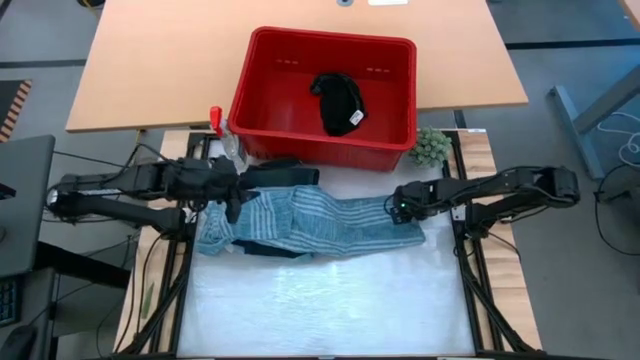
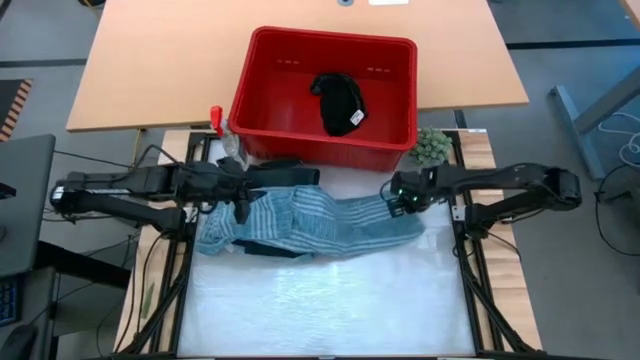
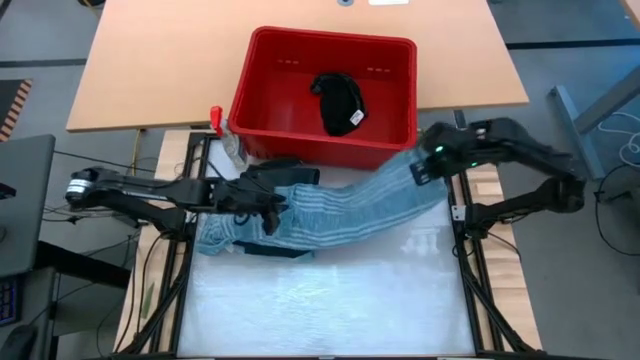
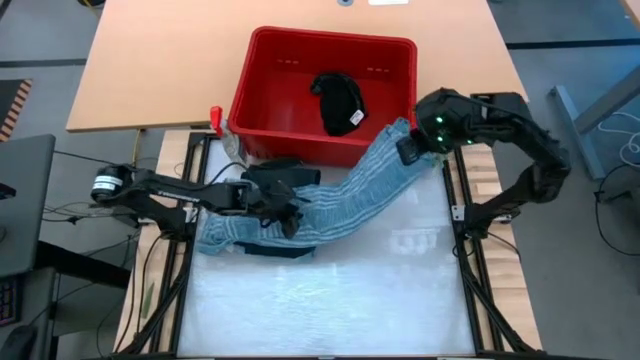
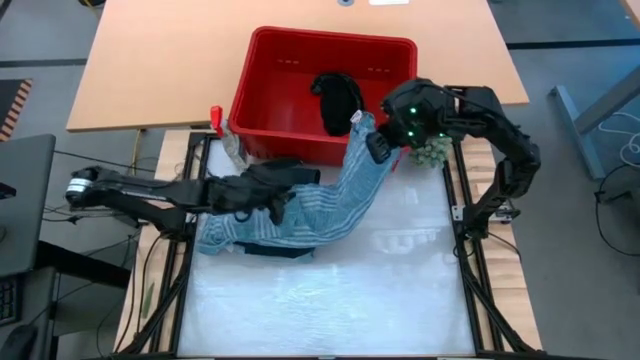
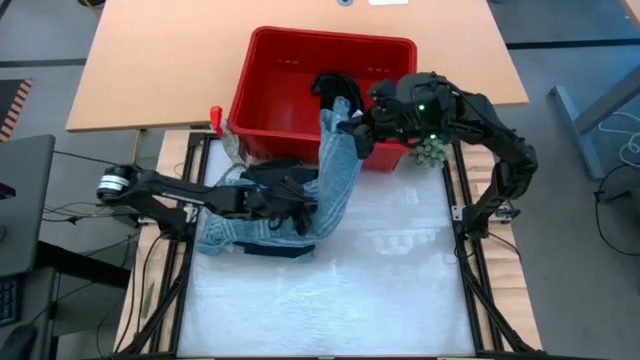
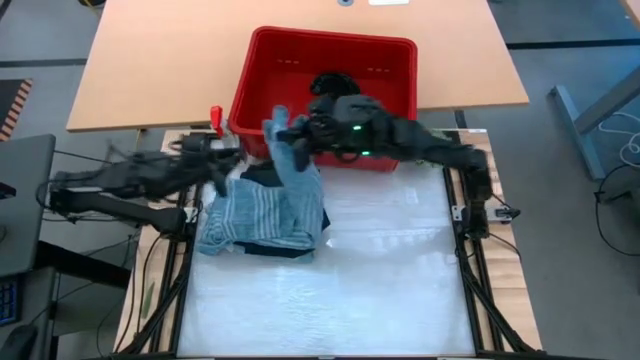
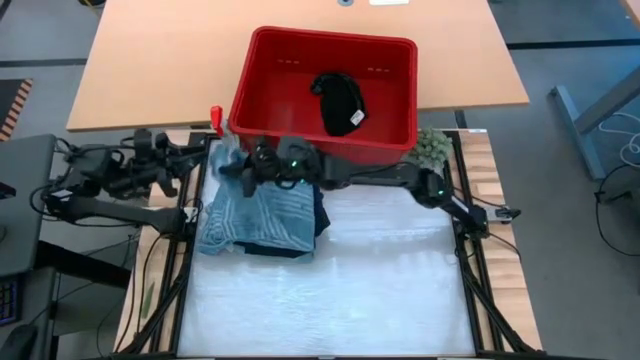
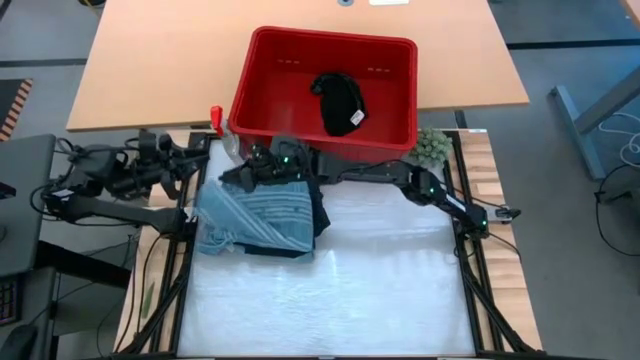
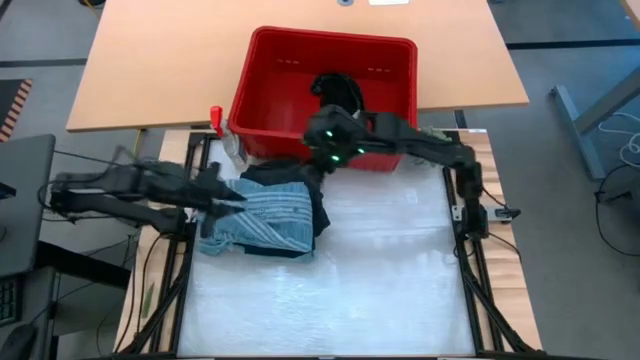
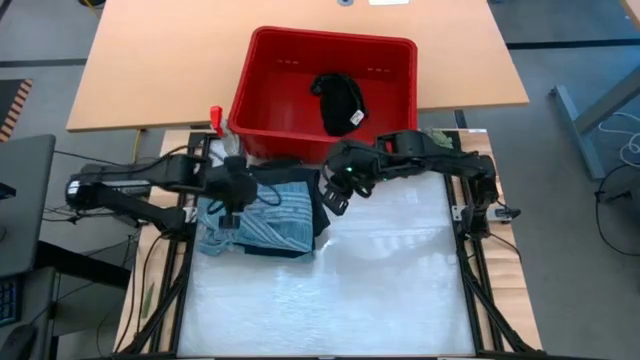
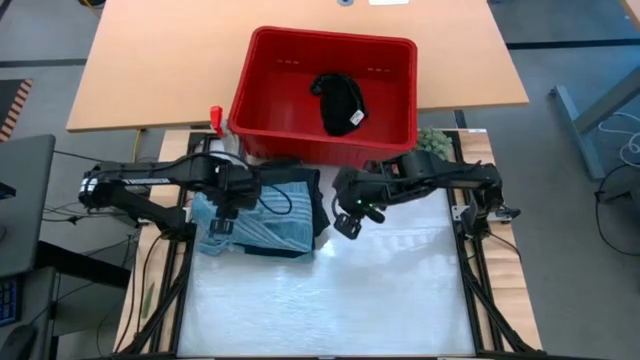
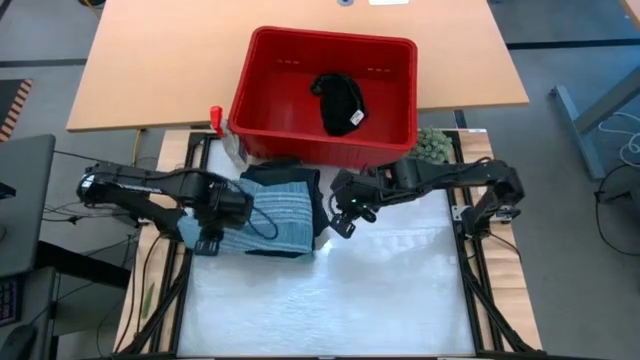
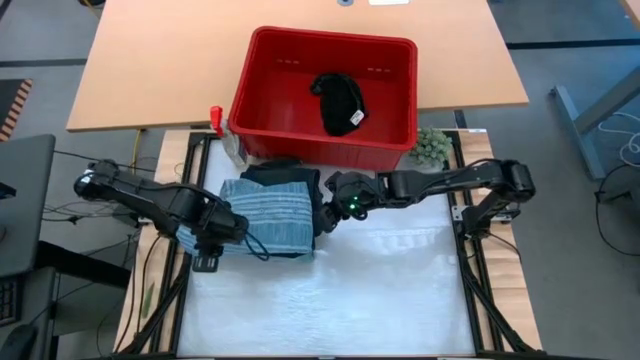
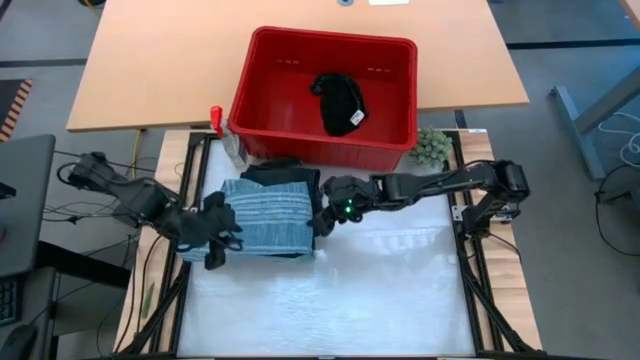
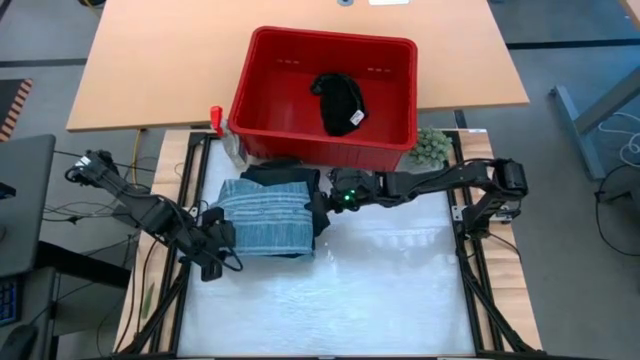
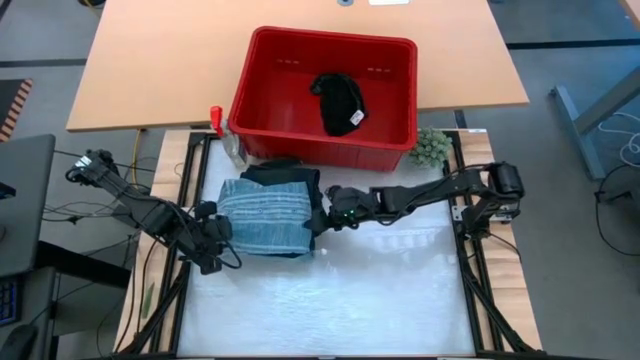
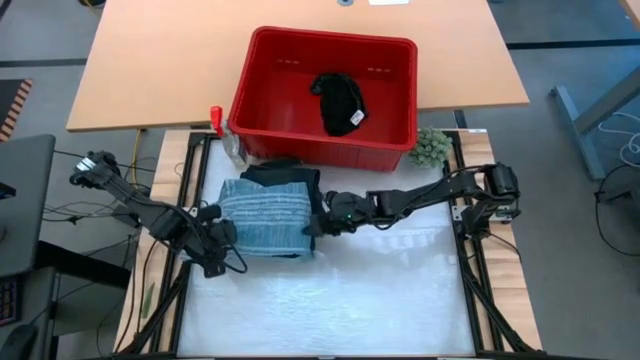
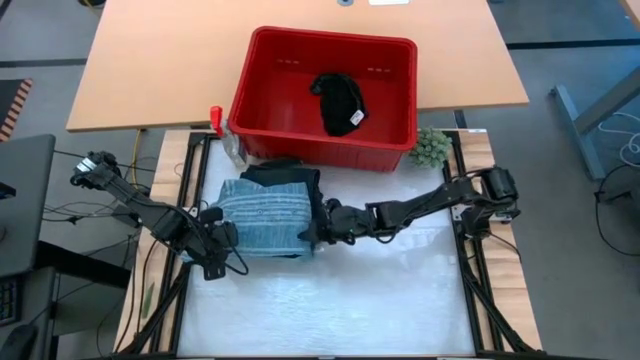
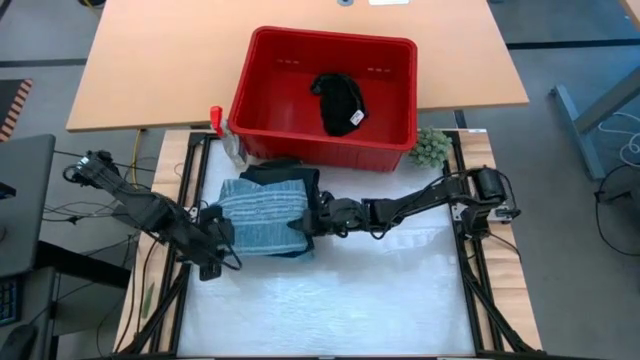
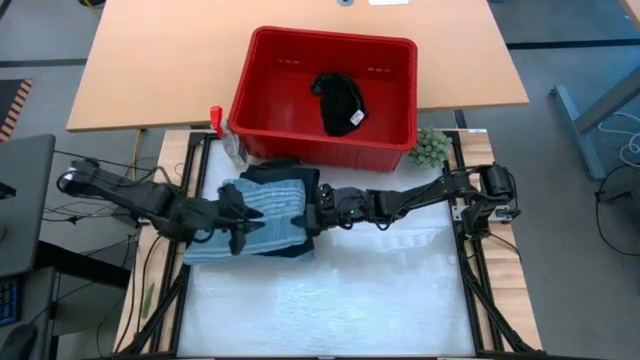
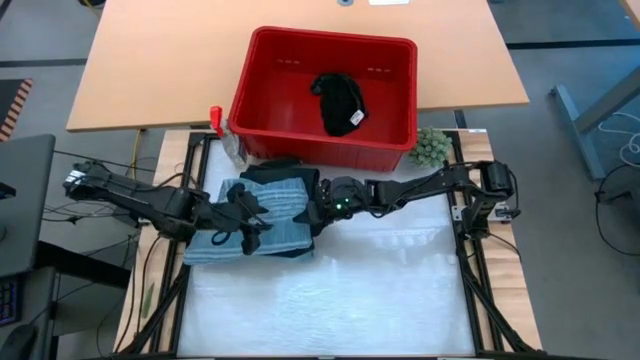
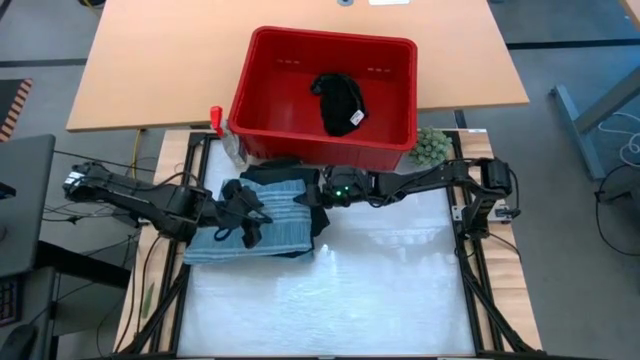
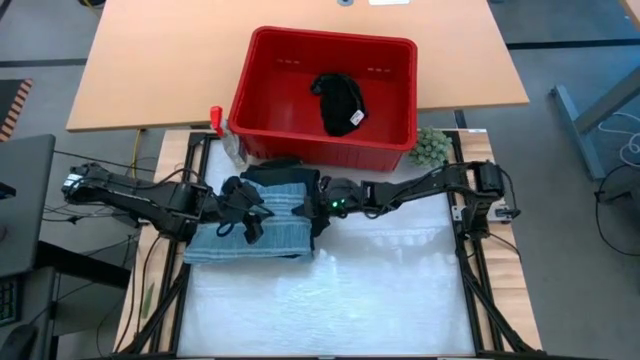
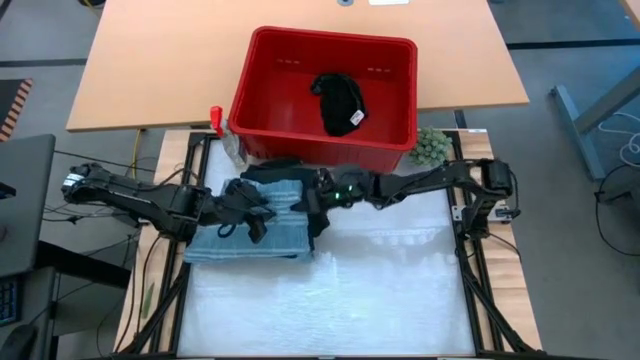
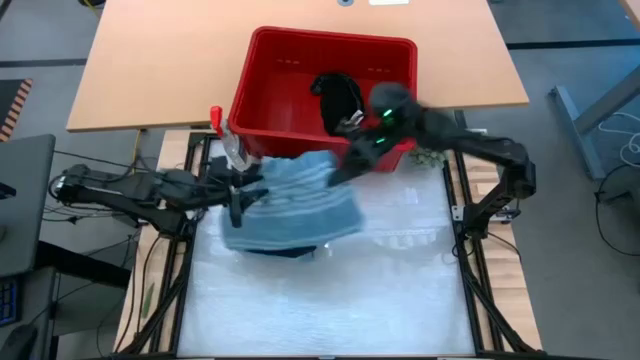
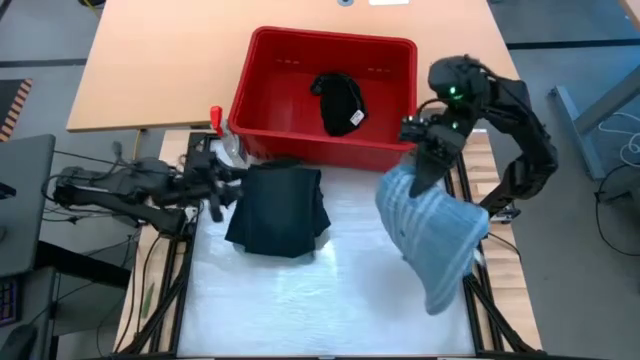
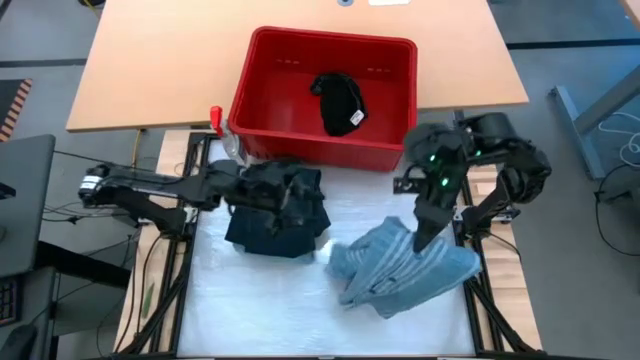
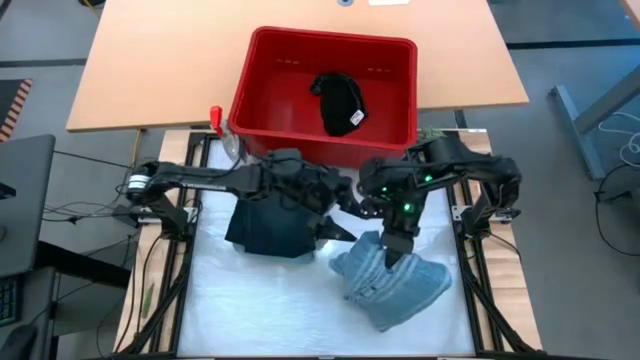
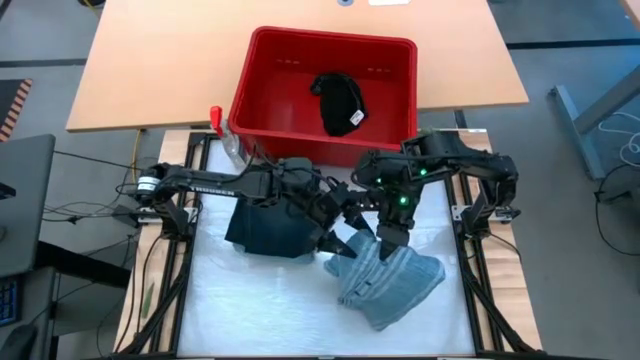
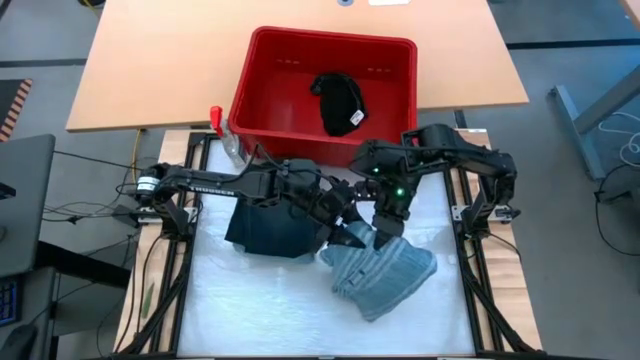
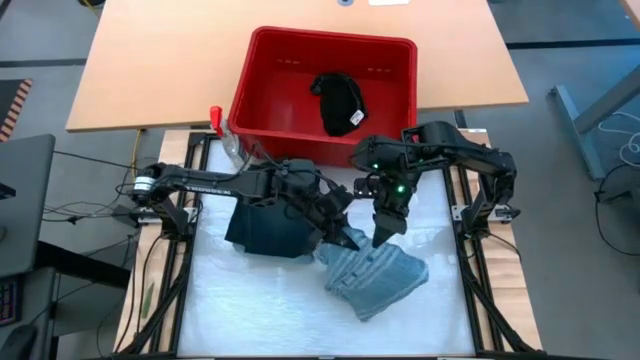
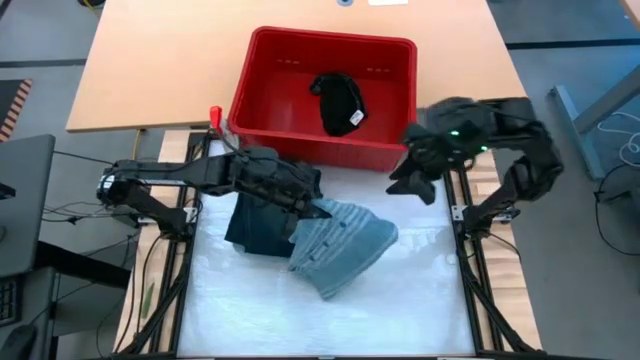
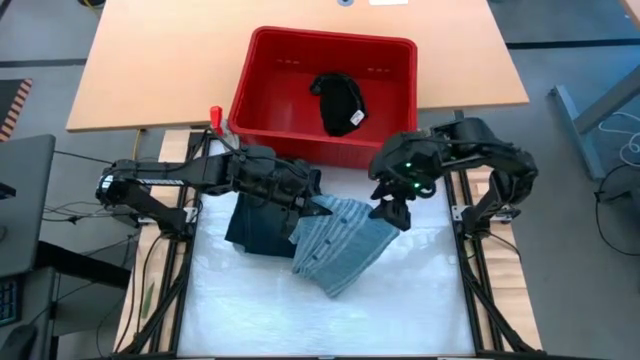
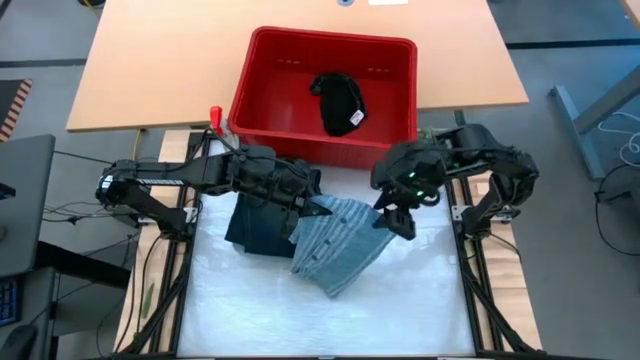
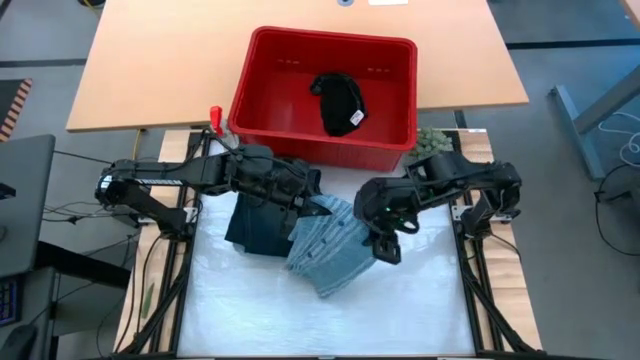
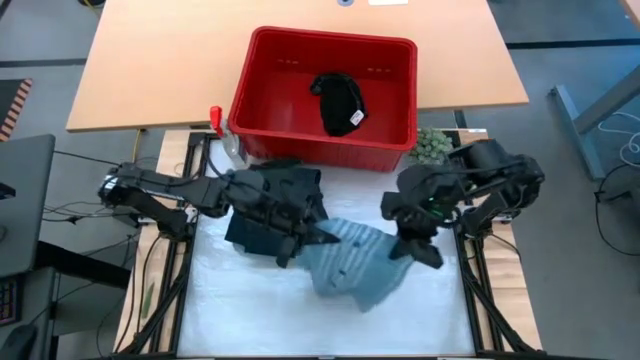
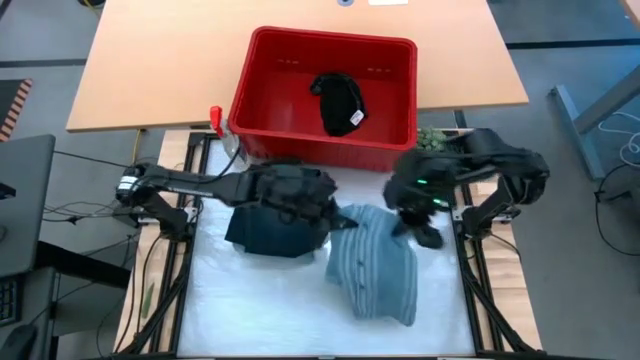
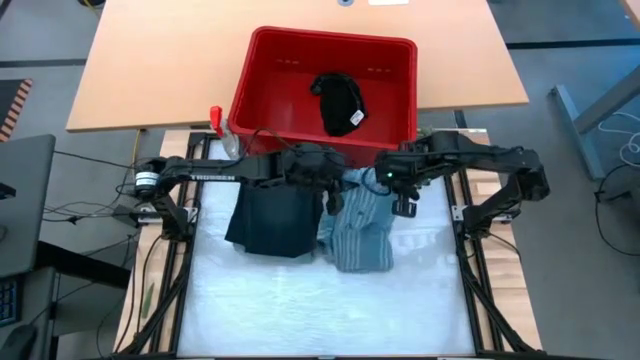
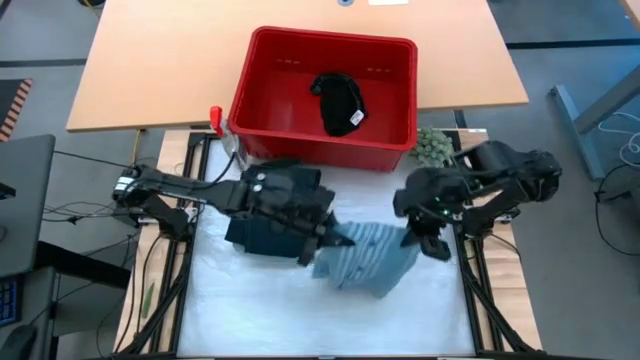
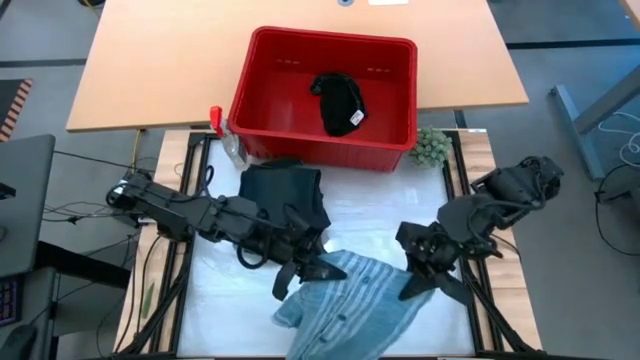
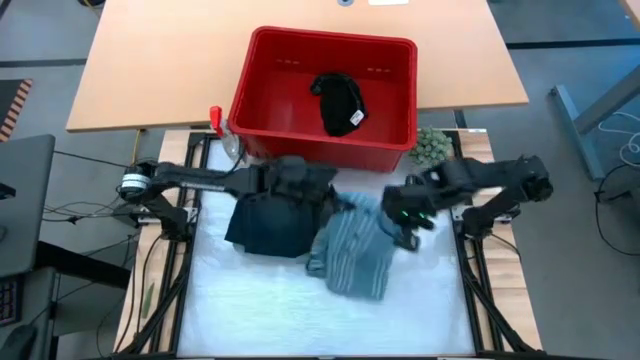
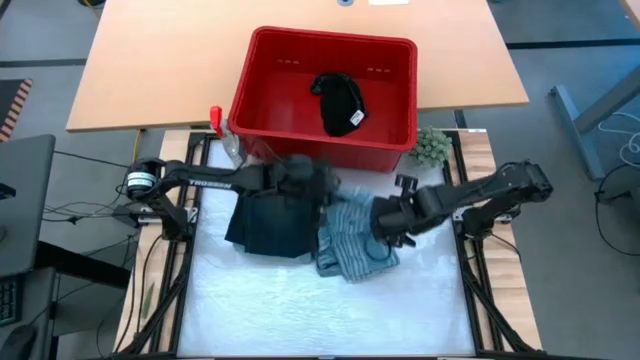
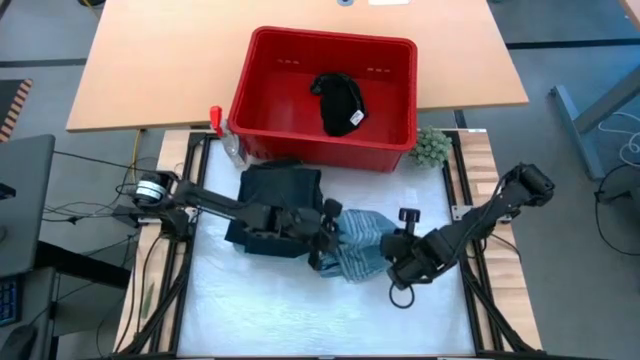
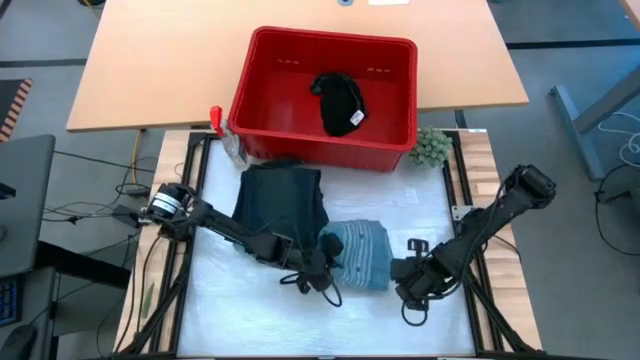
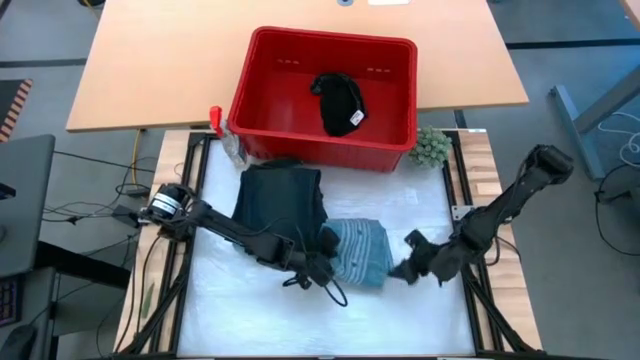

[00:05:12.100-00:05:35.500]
Task: Fold laundry
Fold the blue shirt from the red laundry bin
